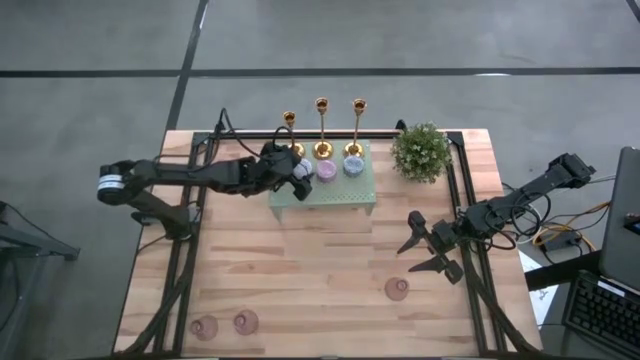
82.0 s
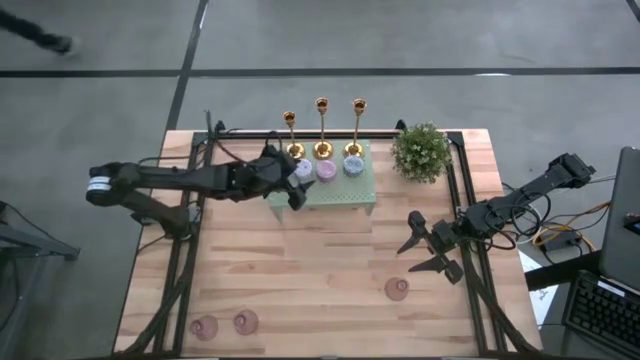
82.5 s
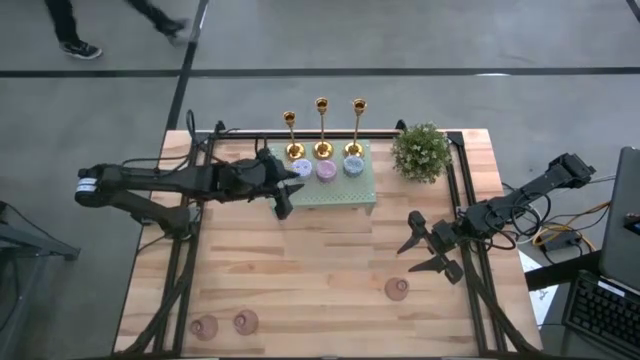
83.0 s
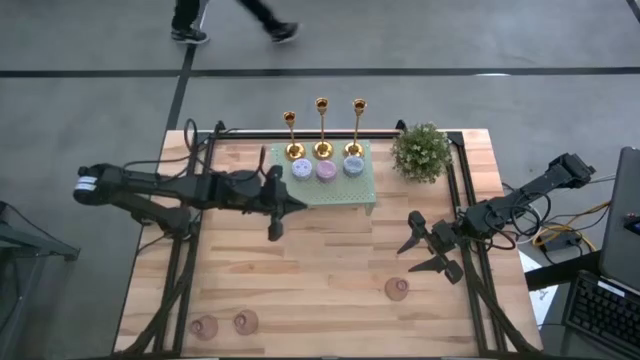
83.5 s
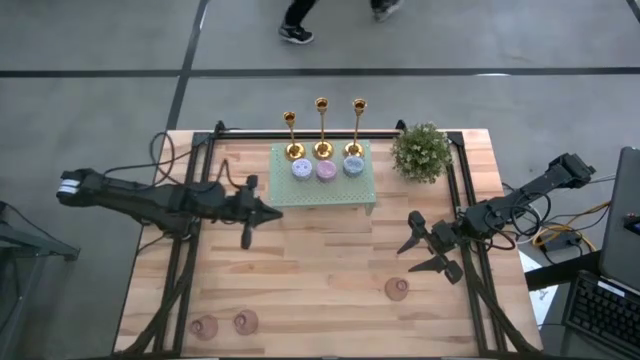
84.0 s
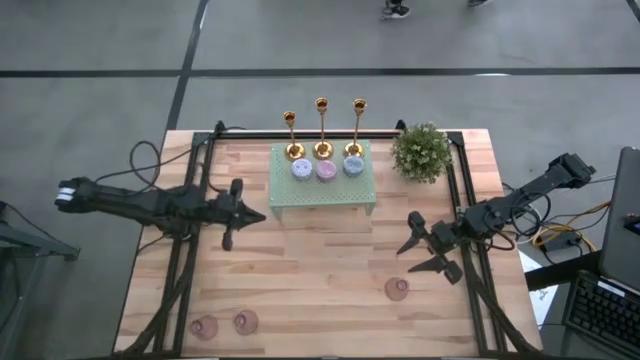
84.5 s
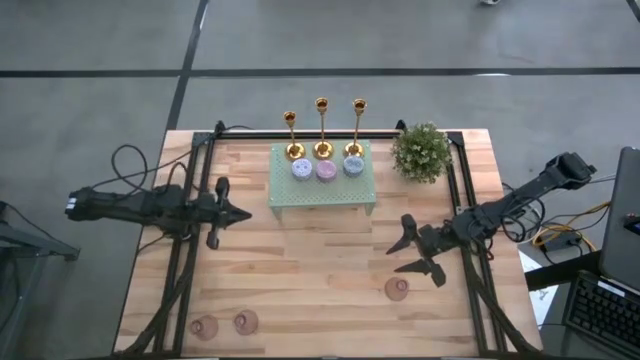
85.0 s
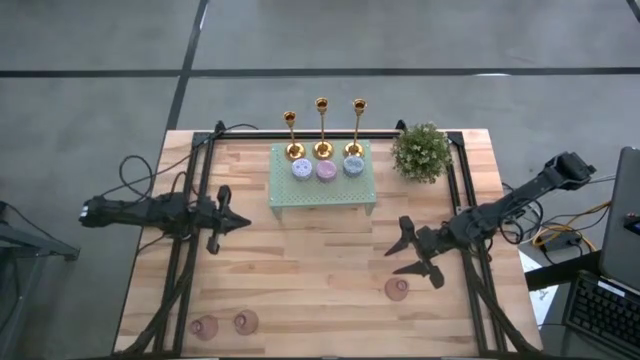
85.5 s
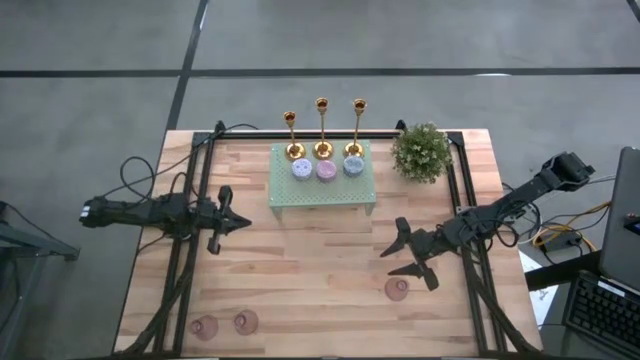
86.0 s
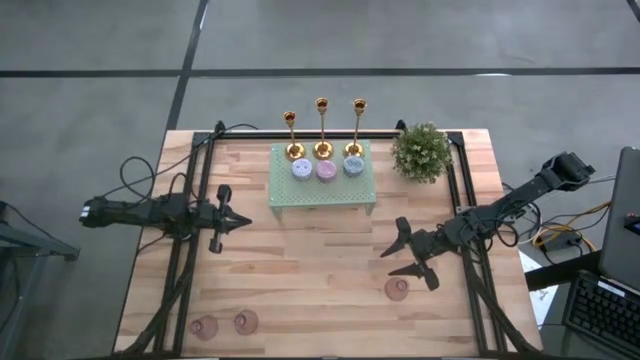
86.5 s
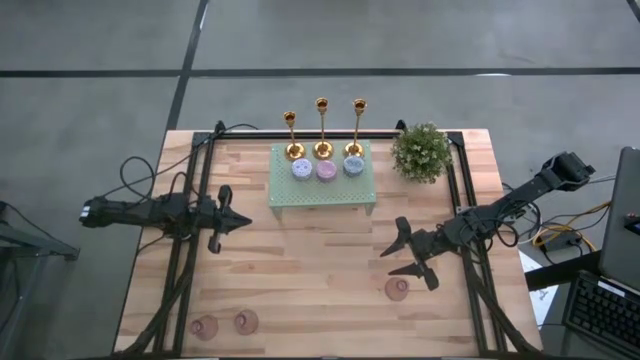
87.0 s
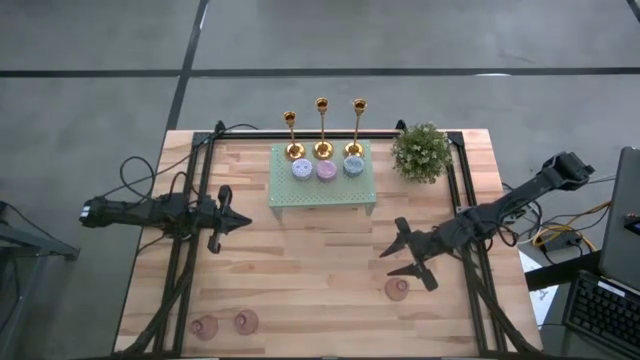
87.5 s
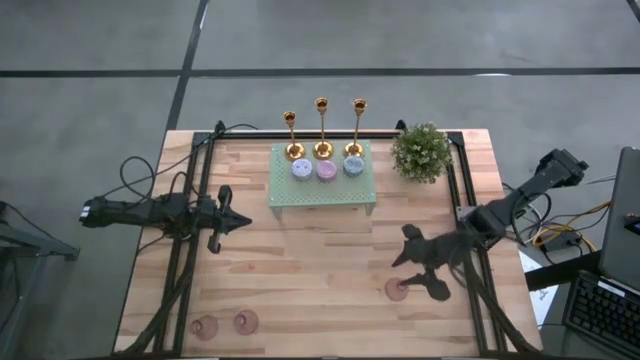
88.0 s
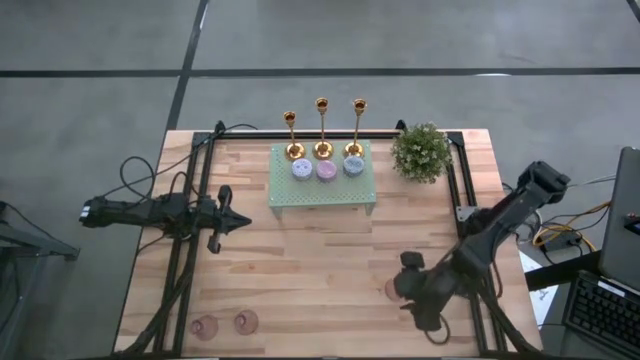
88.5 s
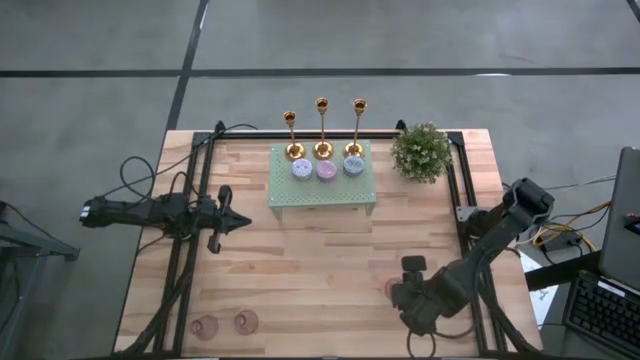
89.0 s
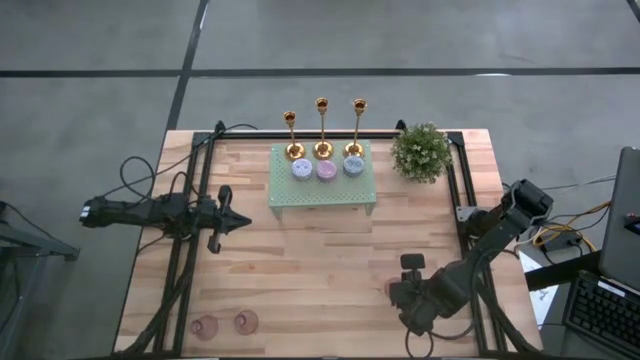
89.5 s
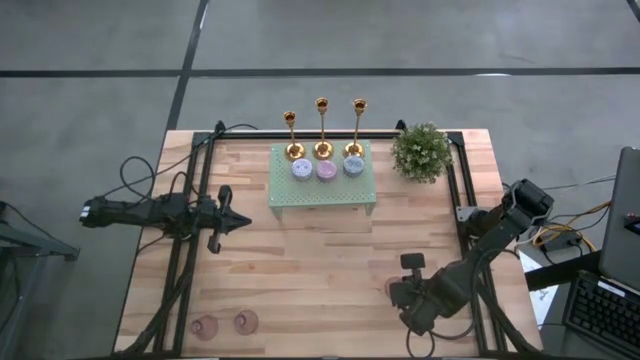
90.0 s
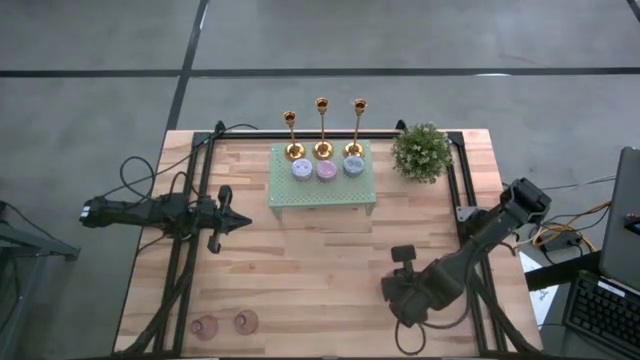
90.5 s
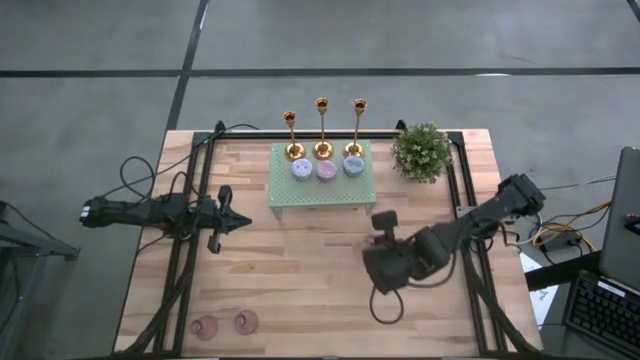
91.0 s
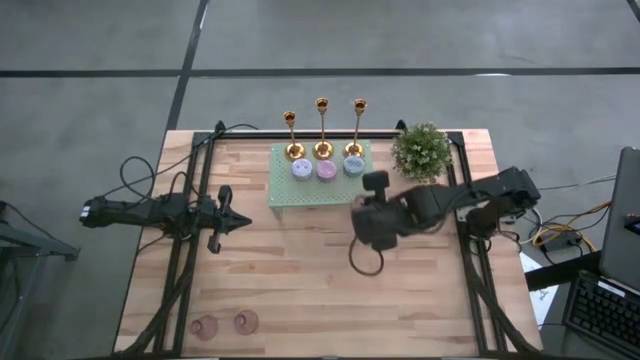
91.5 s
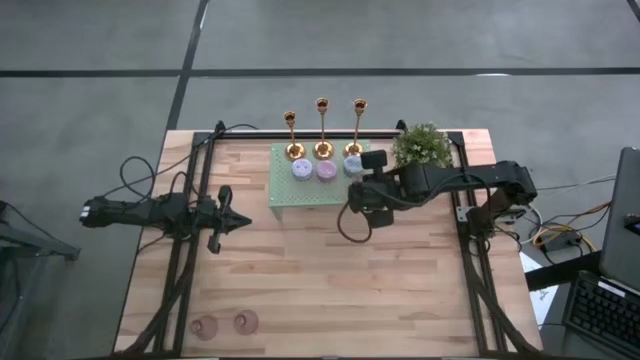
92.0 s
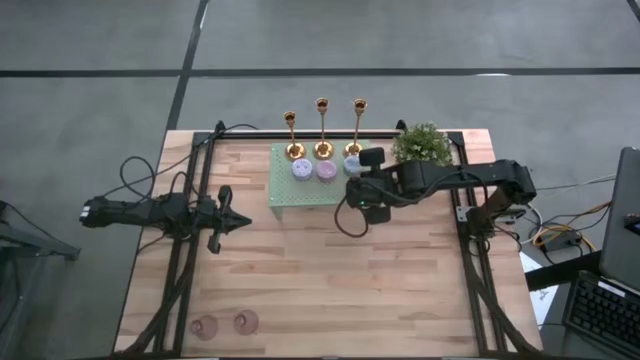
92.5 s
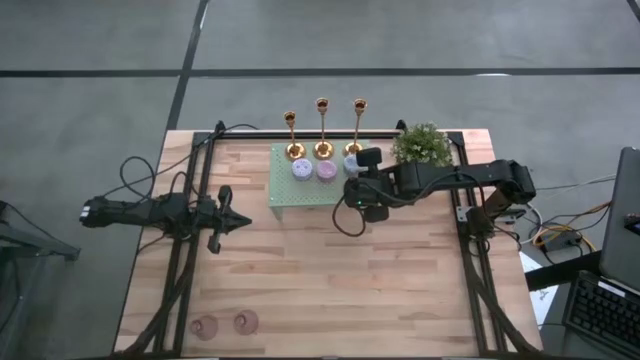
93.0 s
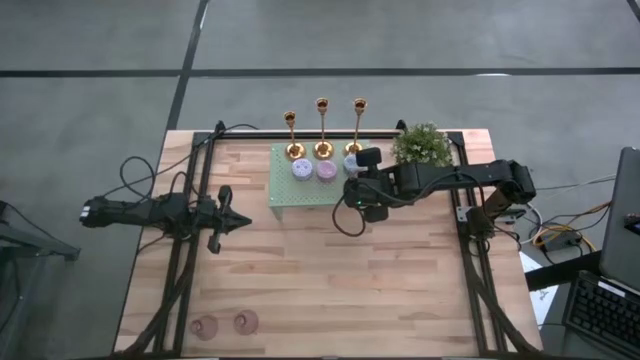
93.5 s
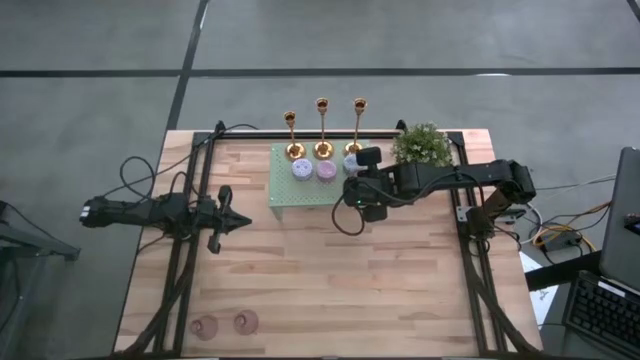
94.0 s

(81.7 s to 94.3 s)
Task: Pick & Place candle stick holders
Put the right pink glass candle holder on the shelf

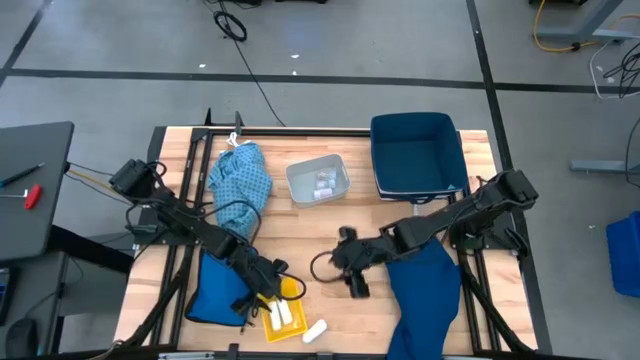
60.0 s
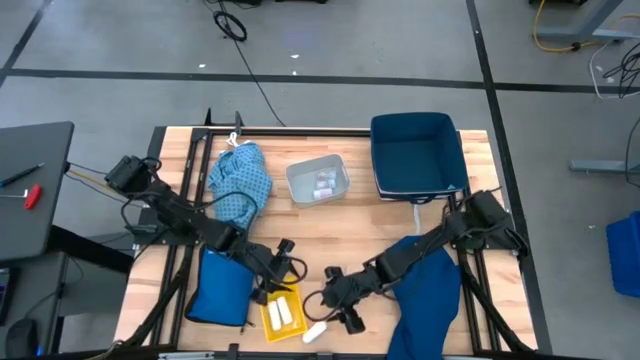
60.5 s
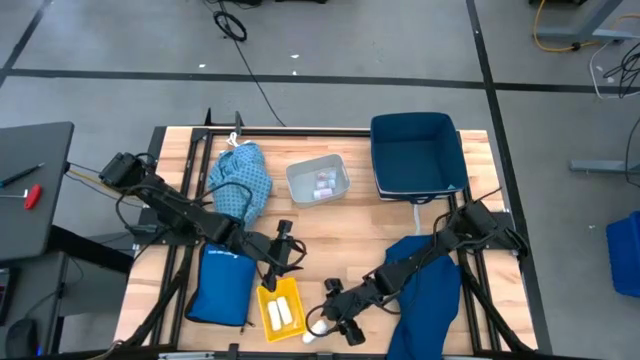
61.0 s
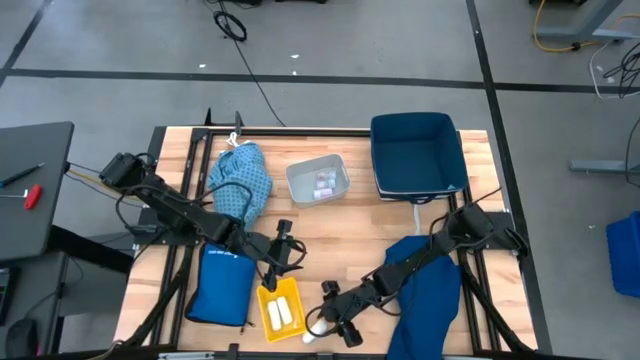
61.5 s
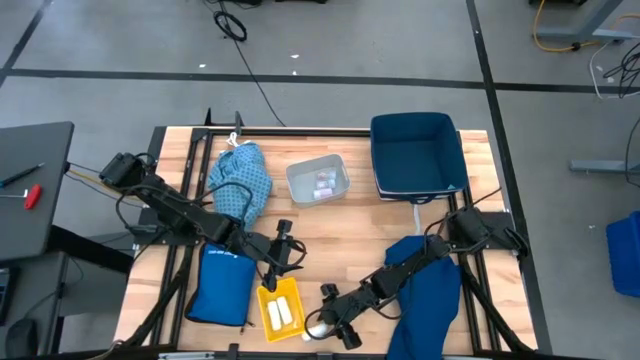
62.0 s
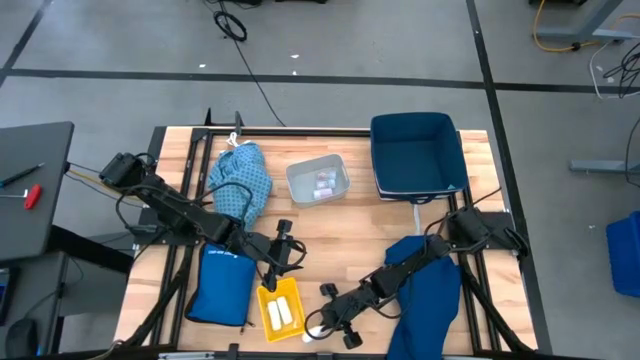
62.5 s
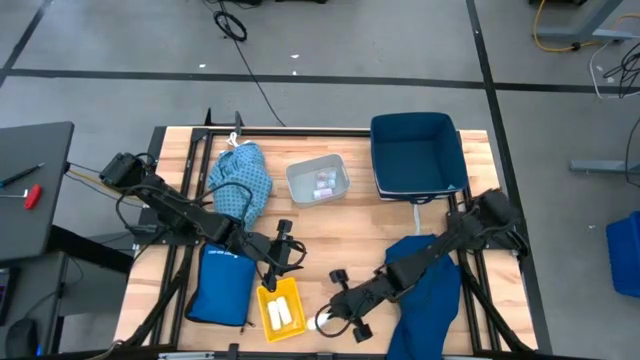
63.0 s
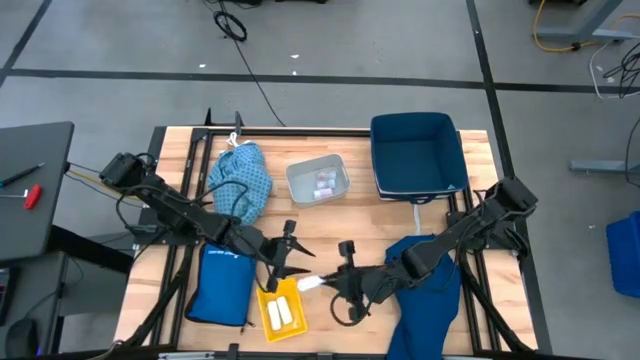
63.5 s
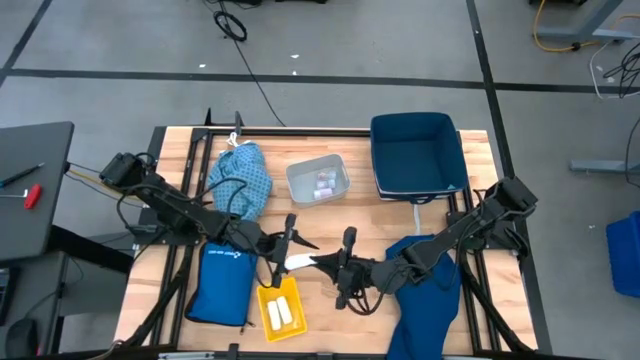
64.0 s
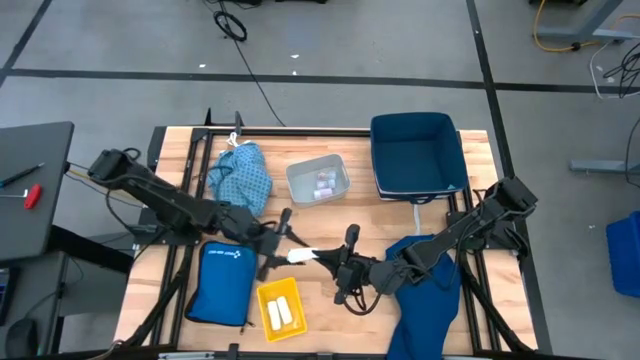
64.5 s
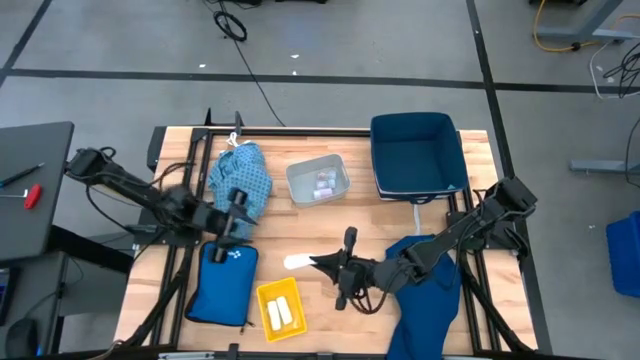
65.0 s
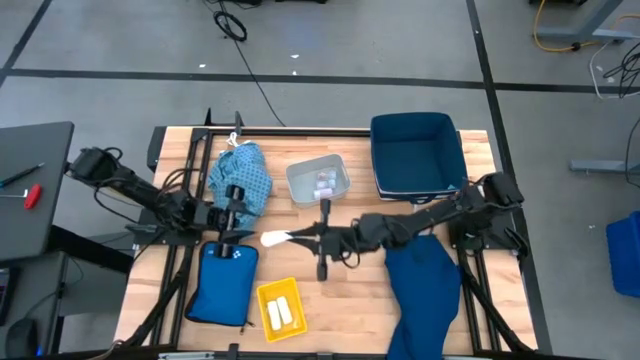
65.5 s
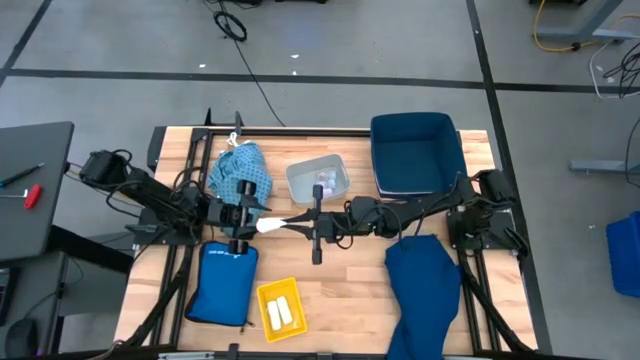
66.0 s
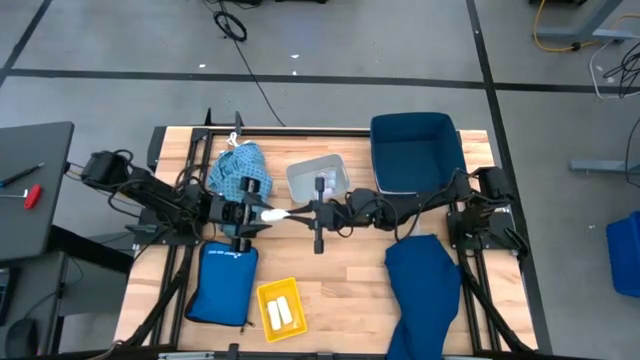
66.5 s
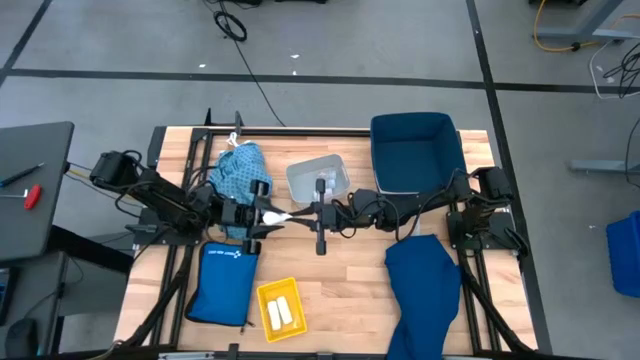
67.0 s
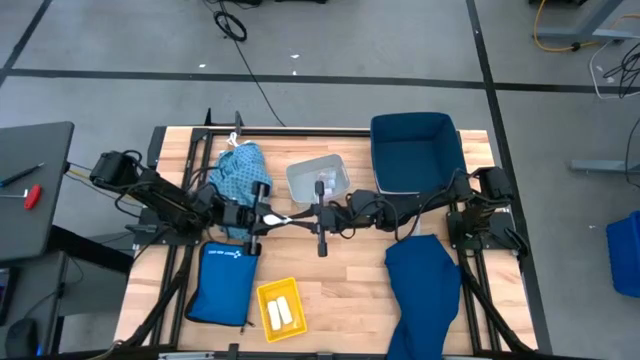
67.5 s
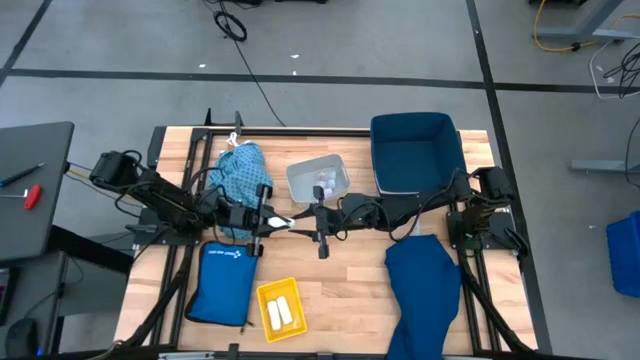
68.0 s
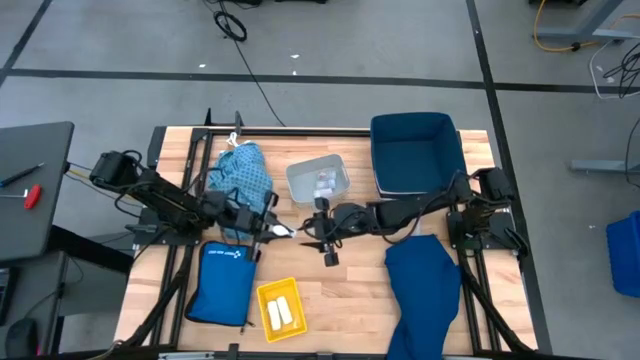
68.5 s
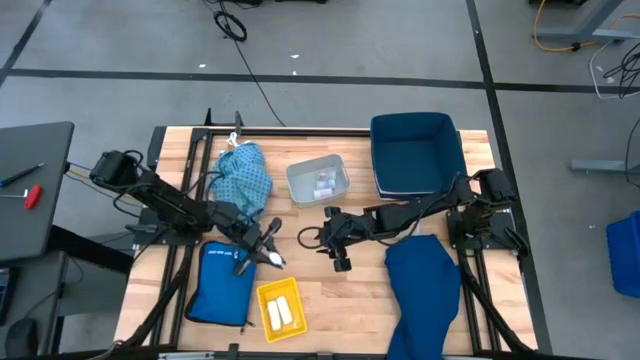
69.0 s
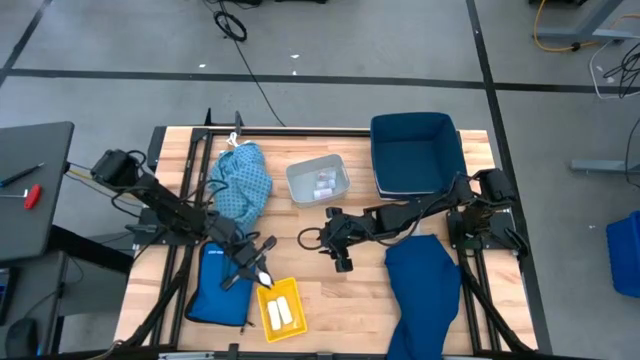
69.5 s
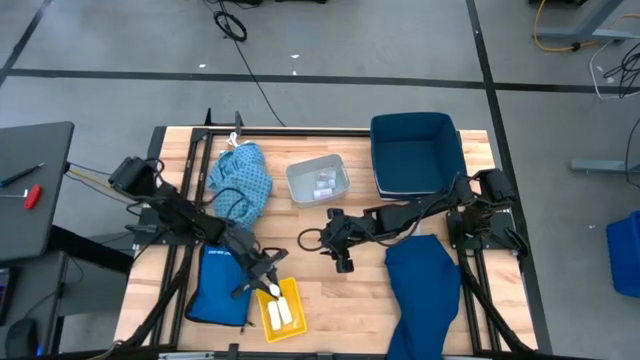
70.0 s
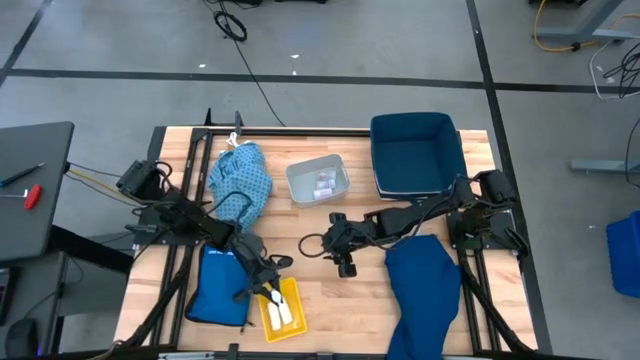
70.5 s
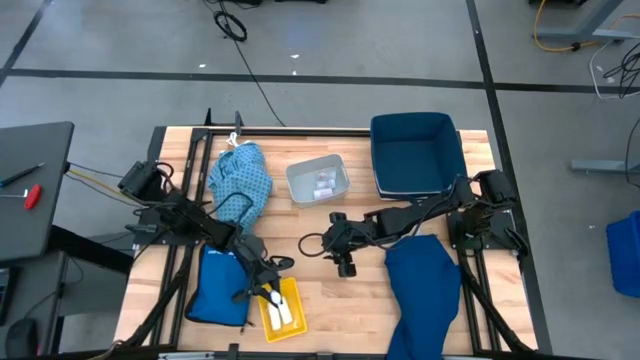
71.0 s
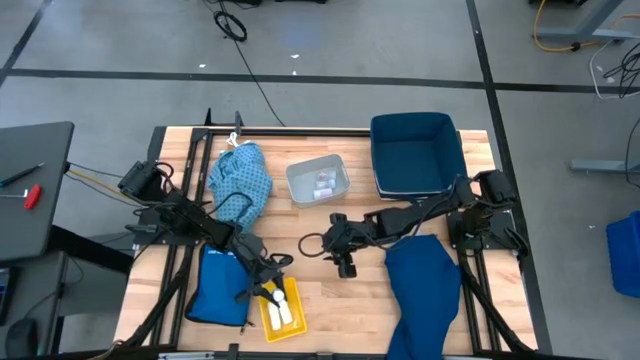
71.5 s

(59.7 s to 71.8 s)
Task: Pick & place medical supplies in basket/bin
Put the rolled gauze into the yellow bin
